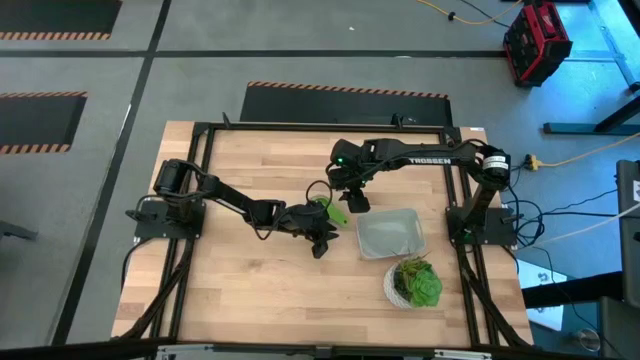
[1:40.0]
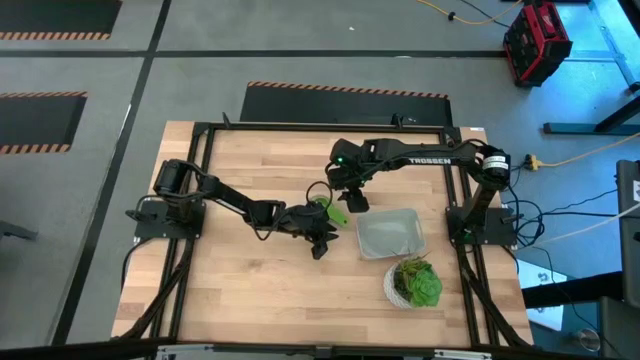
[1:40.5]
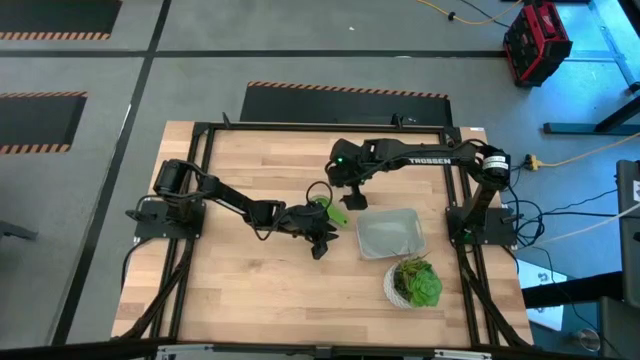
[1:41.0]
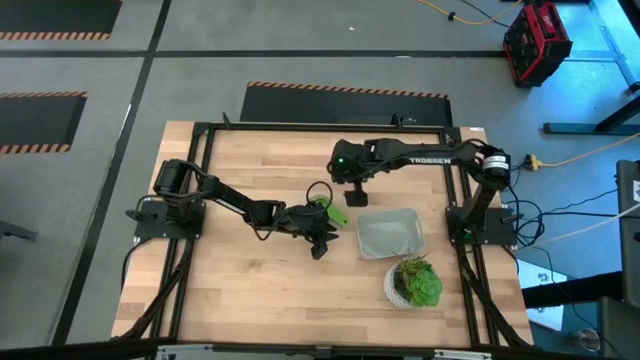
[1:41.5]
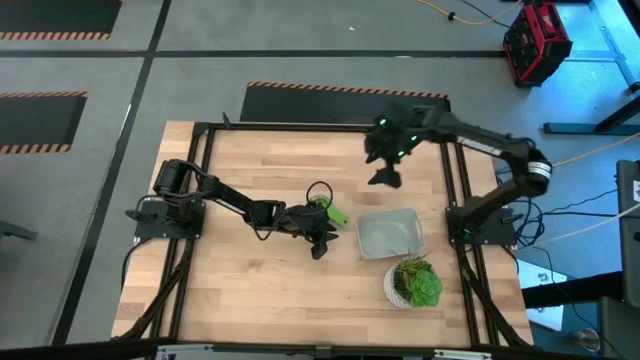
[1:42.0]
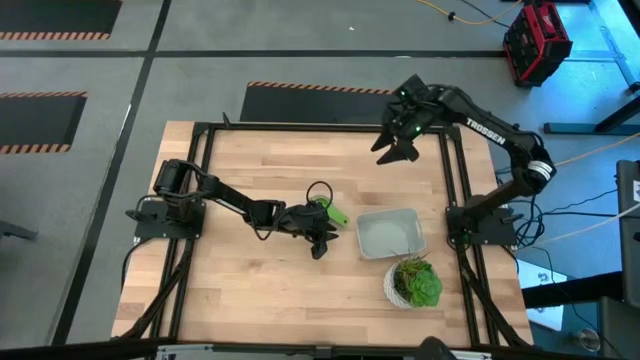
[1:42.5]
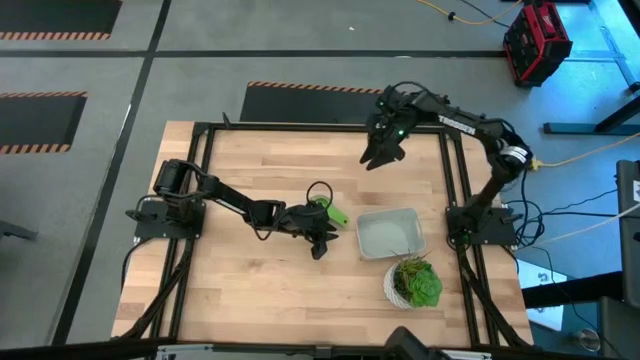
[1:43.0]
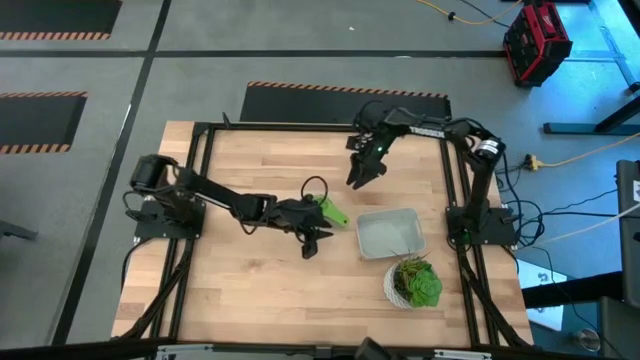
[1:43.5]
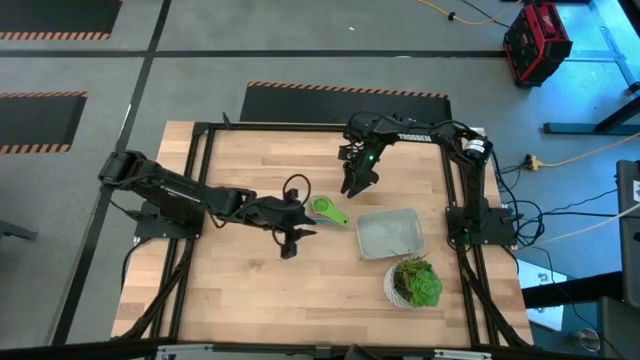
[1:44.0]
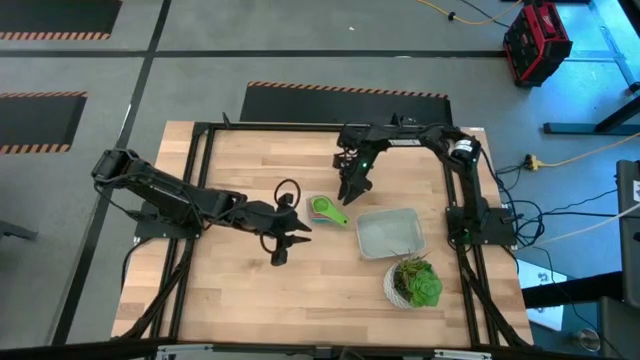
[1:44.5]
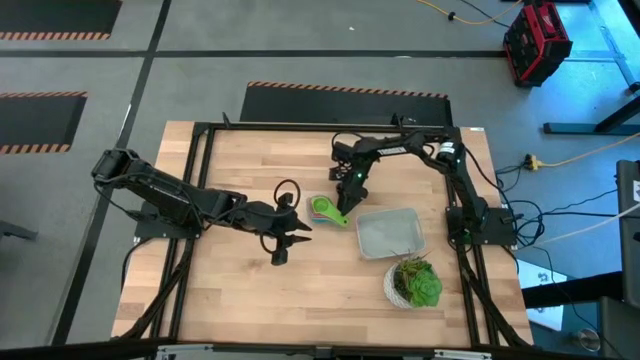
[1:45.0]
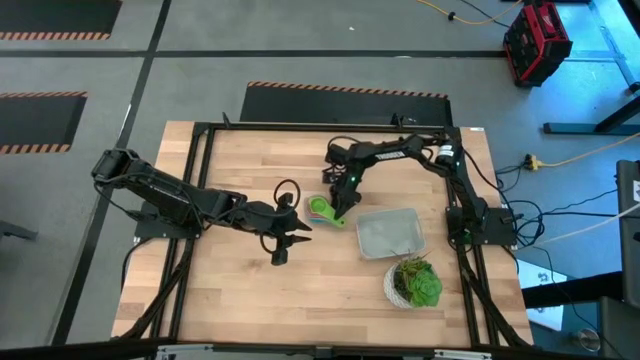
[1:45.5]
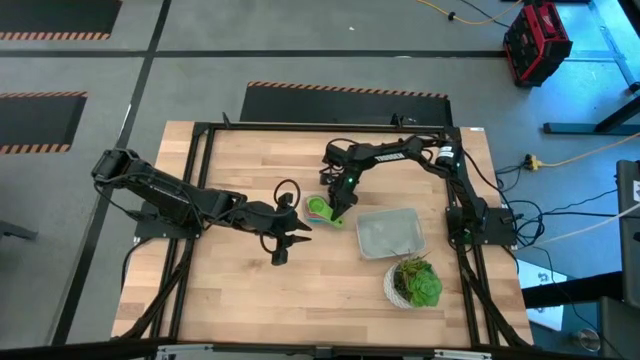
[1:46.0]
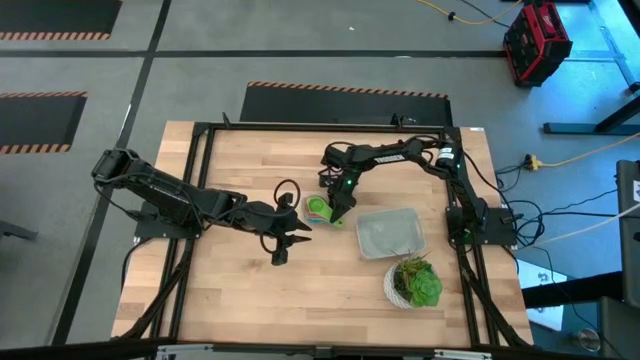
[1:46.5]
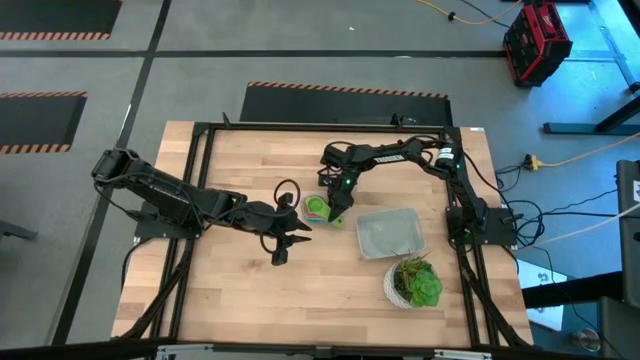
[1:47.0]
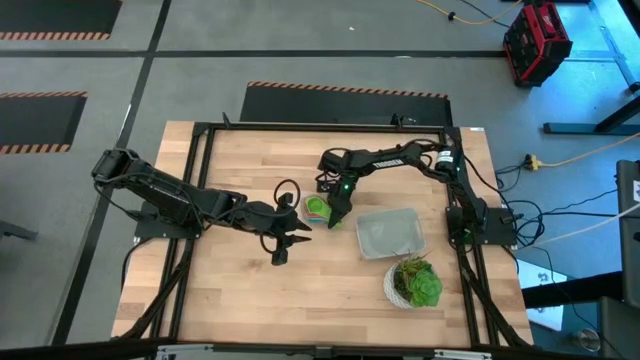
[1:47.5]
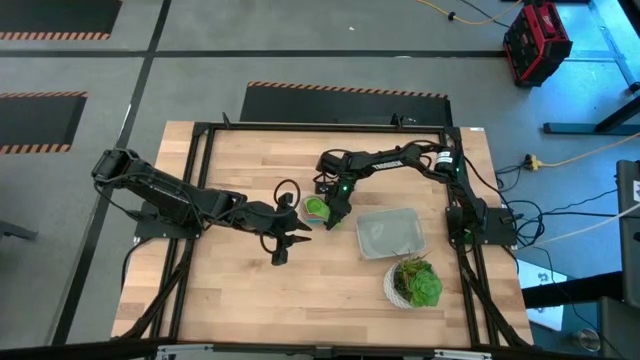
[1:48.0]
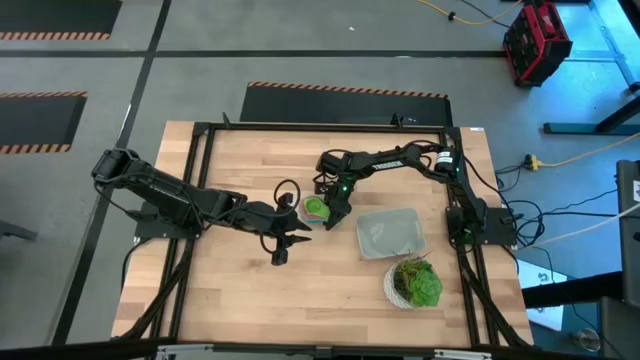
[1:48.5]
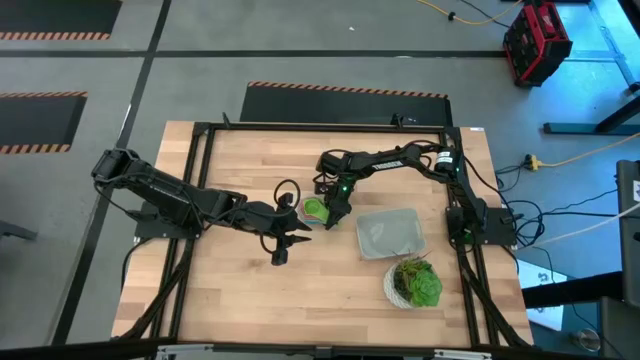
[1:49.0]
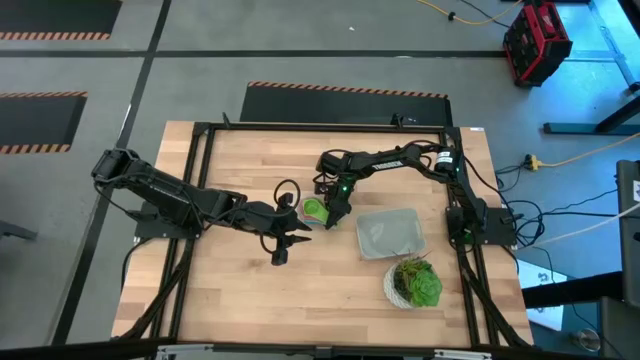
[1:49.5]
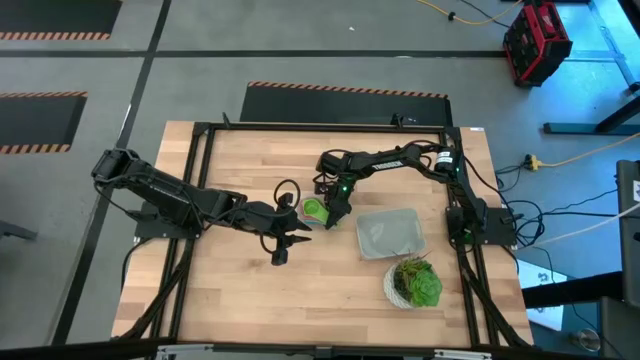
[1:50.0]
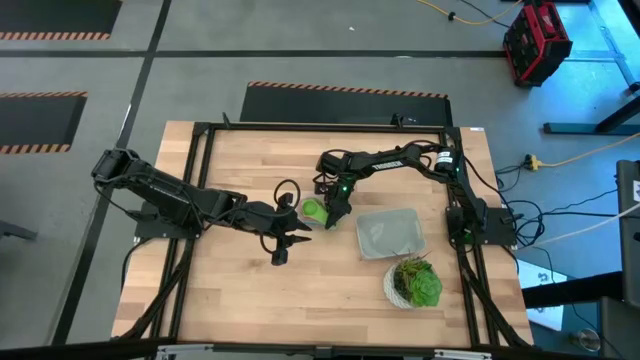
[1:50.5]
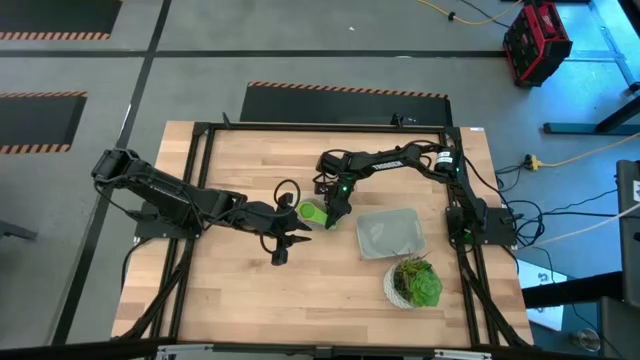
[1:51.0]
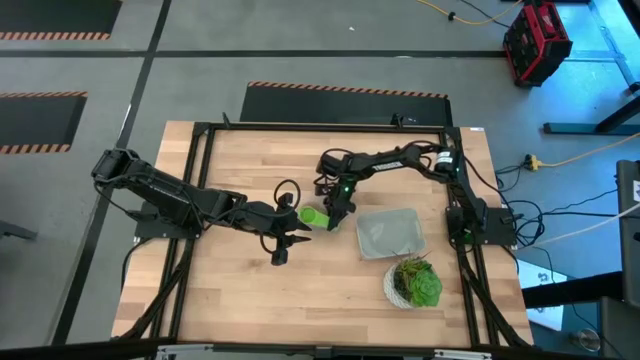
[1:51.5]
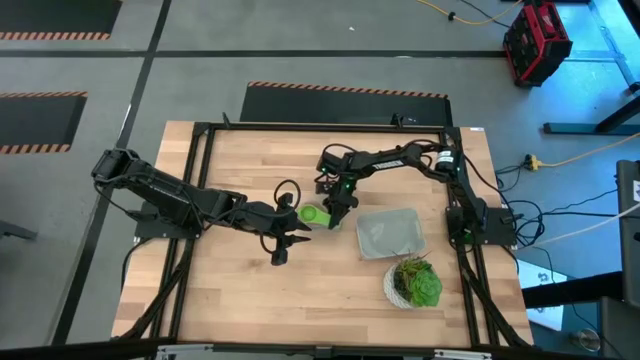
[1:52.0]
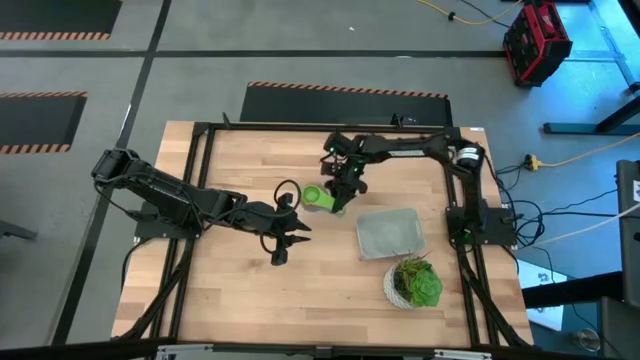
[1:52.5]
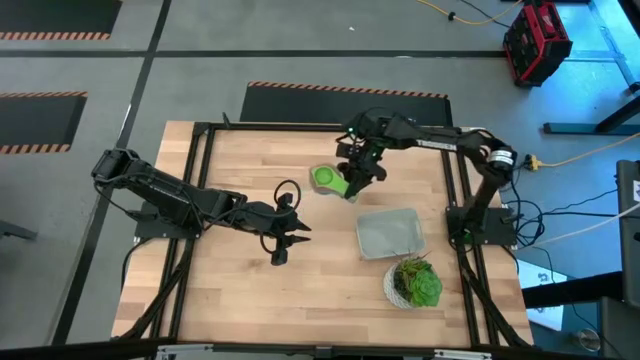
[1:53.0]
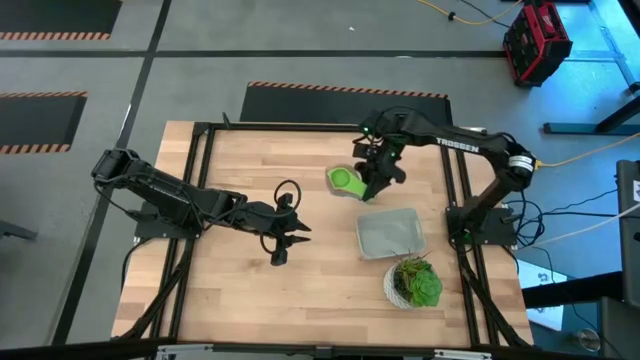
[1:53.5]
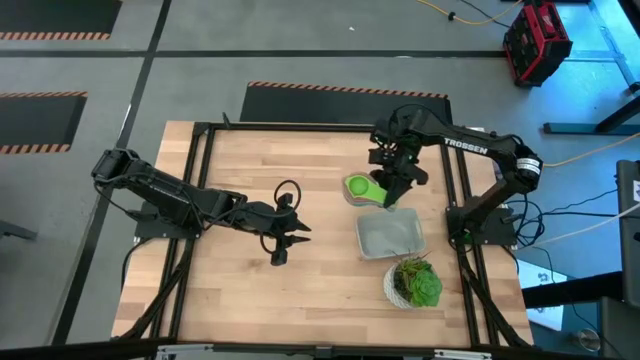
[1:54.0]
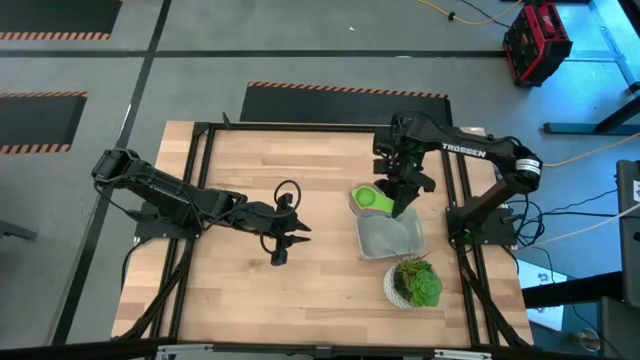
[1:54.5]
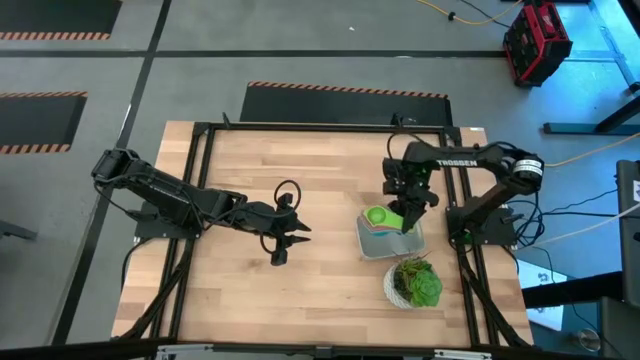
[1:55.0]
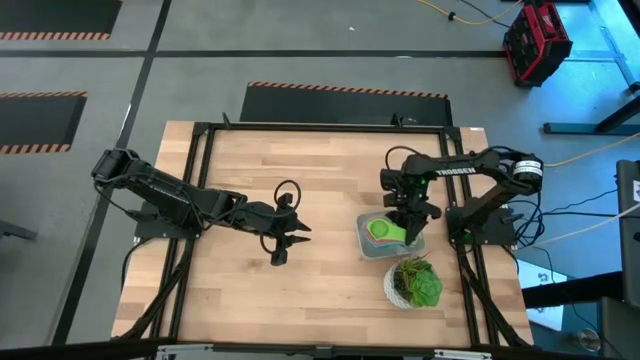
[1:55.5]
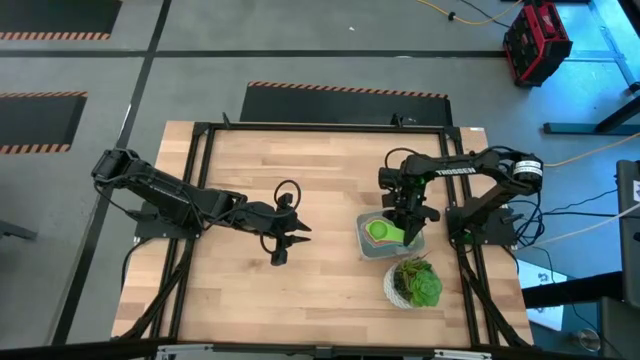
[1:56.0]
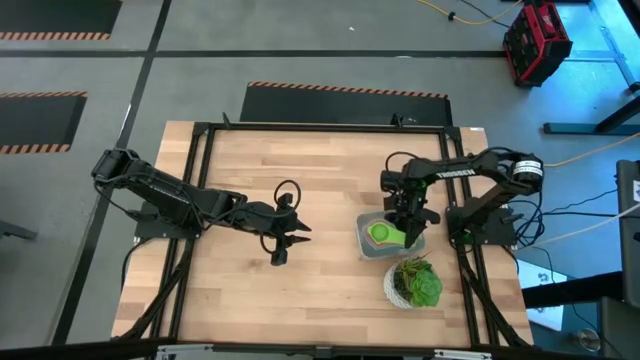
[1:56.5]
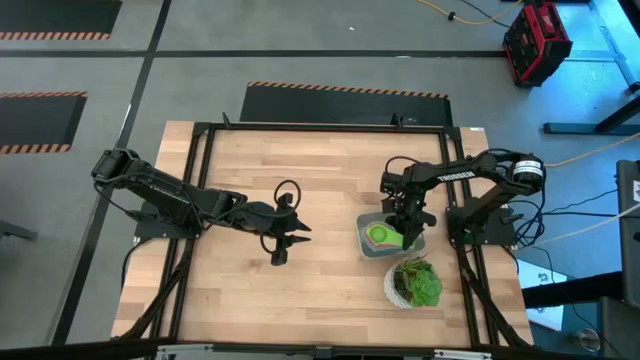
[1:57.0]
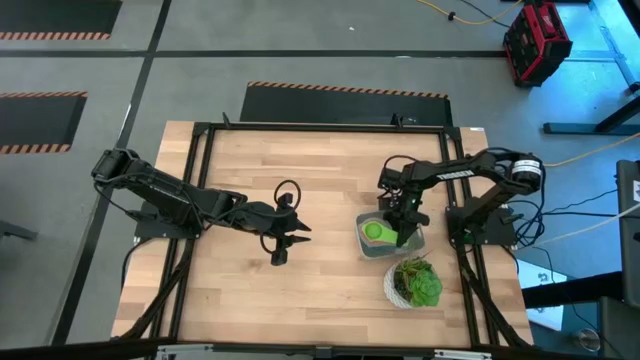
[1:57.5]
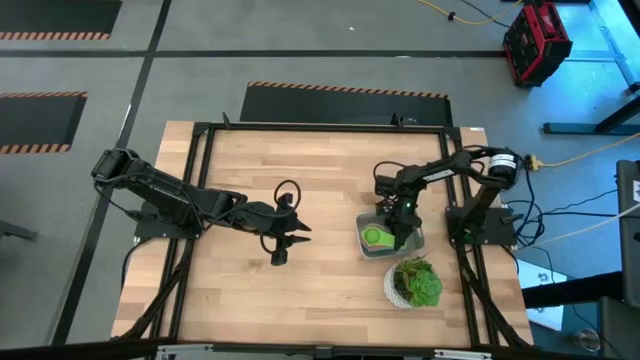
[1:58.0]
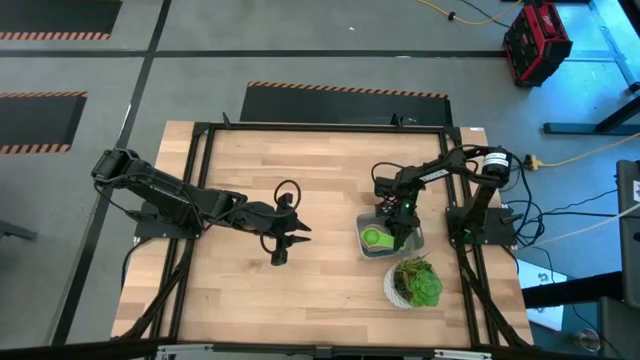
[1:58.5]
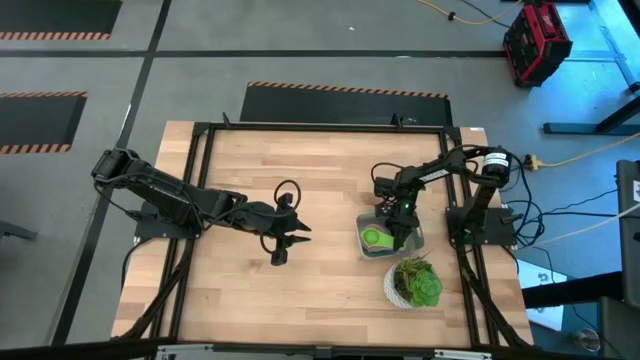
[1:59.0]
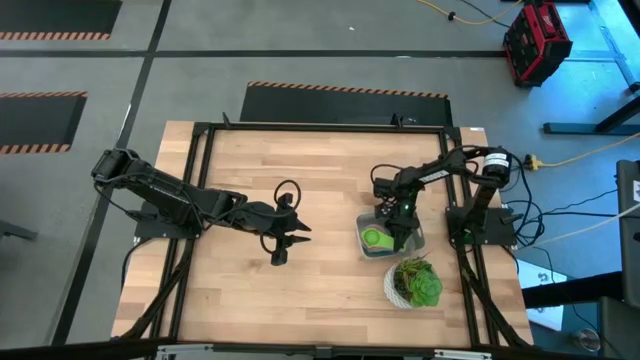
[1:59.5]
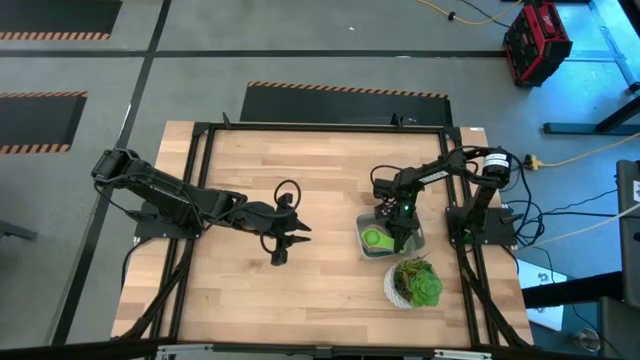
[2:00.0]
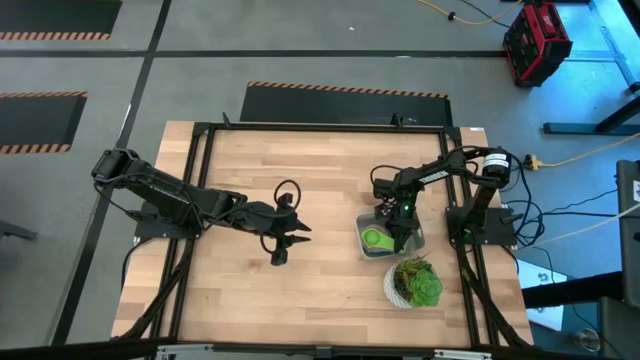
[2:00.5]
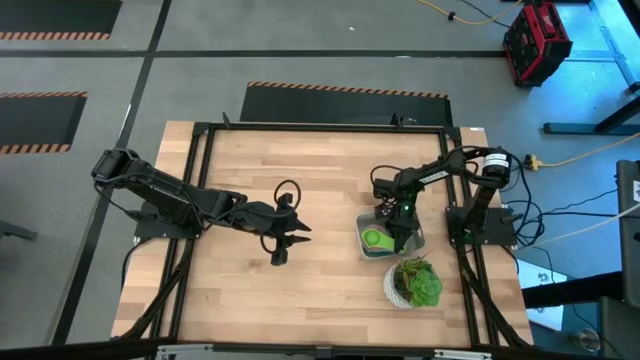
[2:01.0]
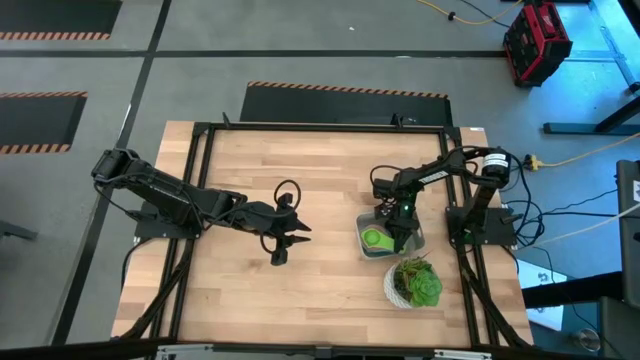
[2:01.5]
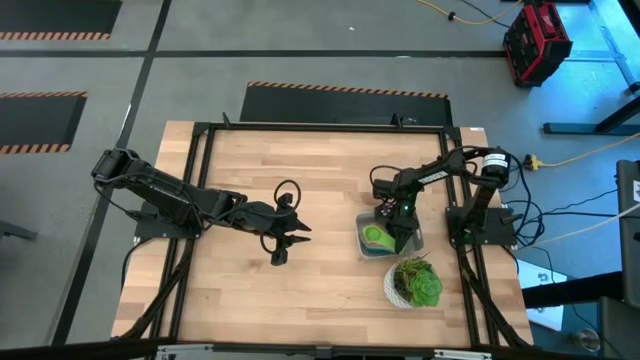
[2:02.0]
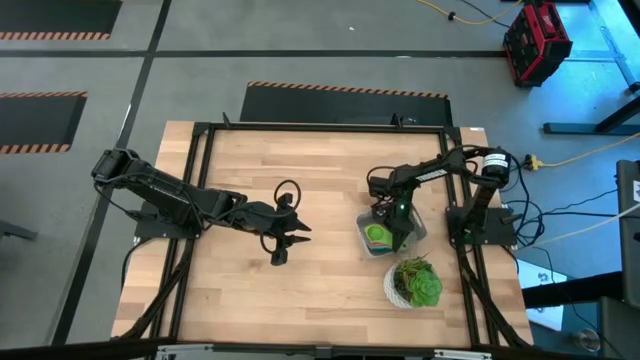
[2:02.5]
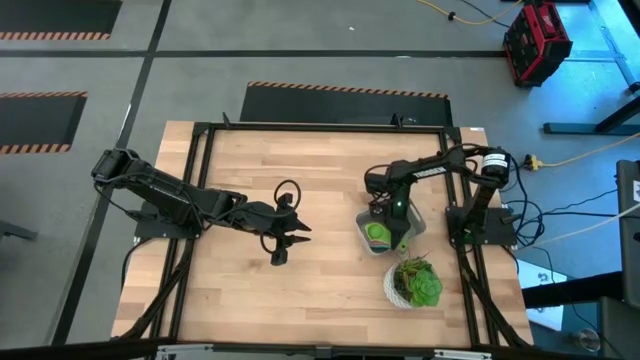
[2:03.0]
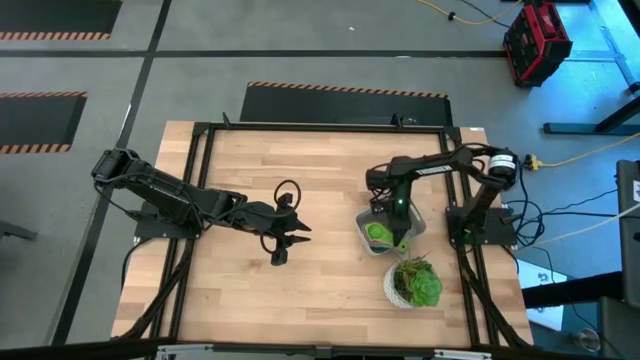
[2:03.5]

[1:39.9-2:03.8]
Task: Nest measuring cups in basket
Put the stacked measuring cups into the gray bin
